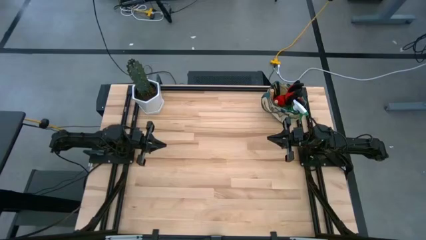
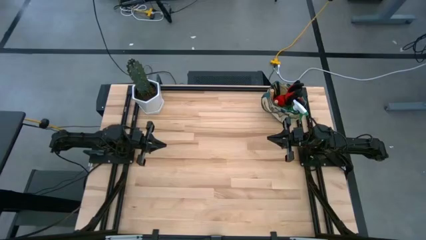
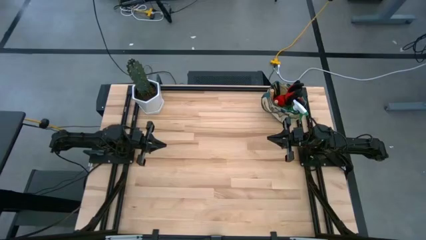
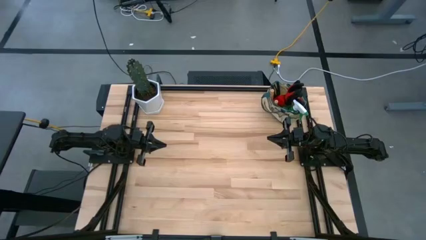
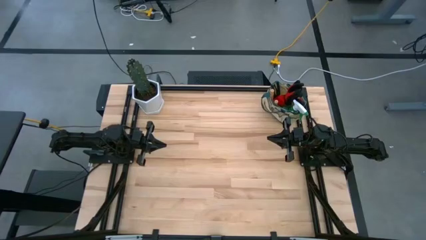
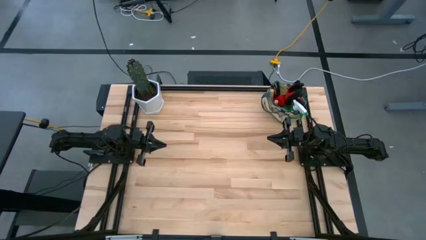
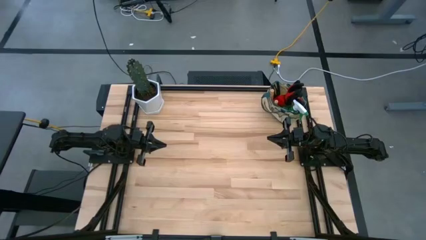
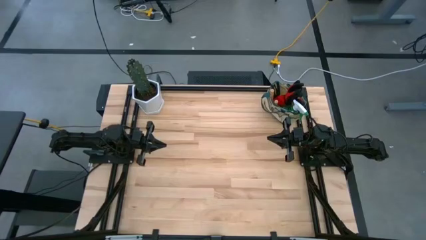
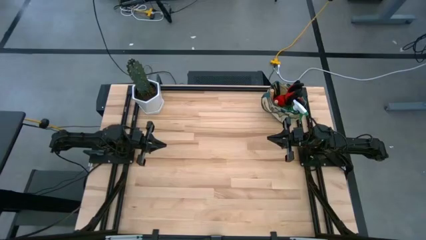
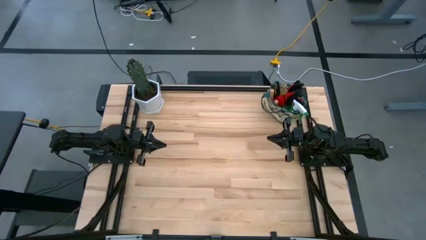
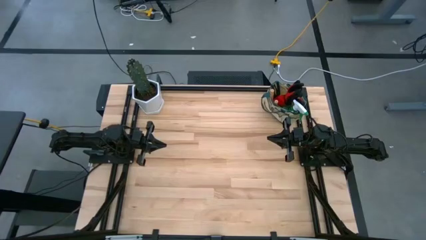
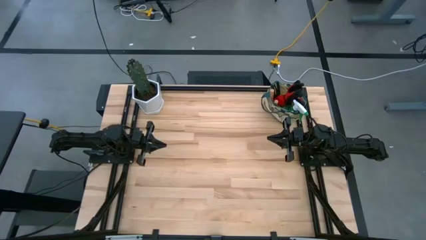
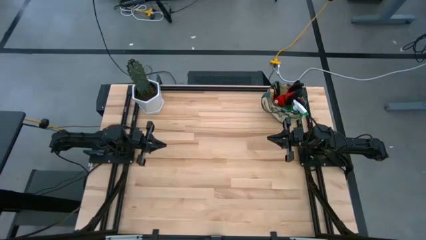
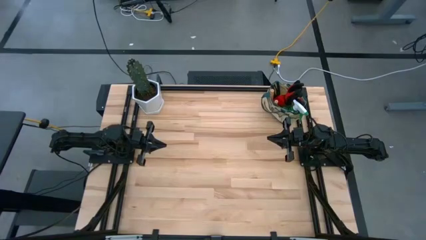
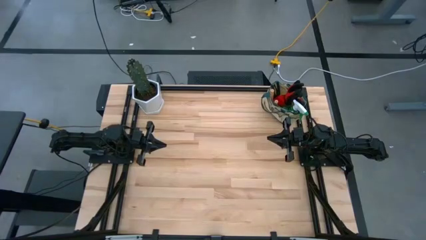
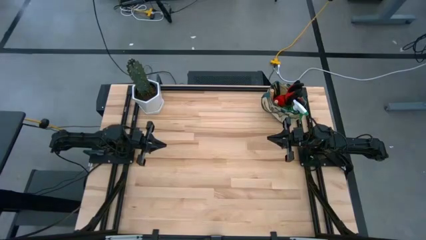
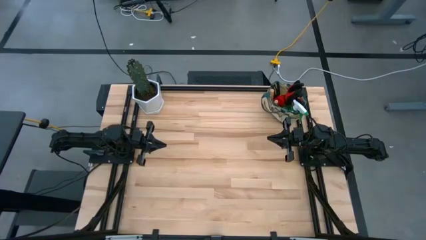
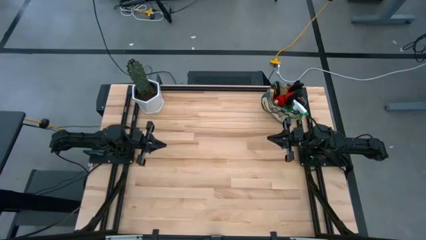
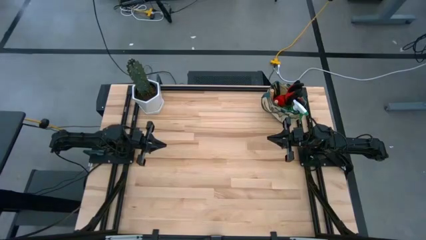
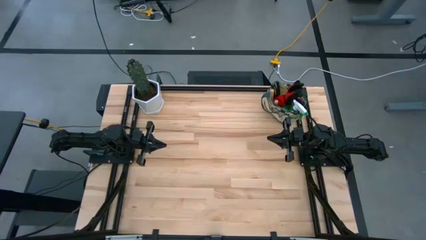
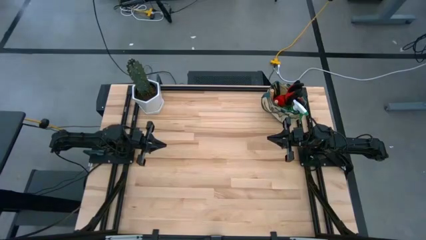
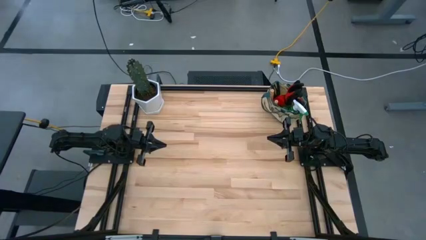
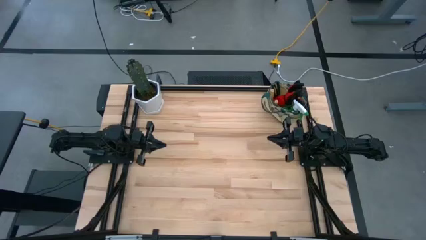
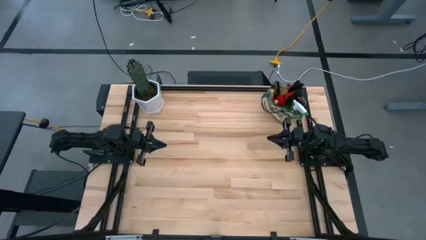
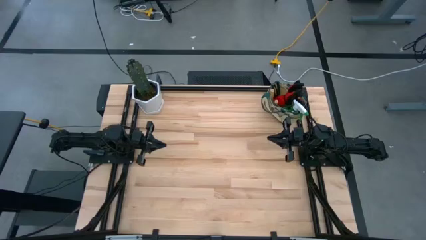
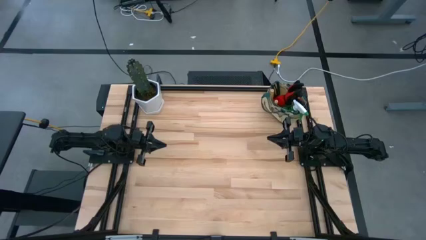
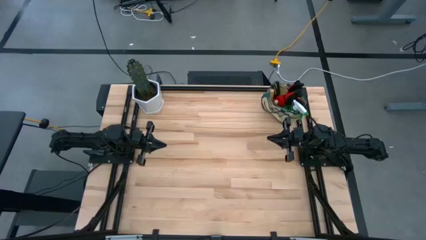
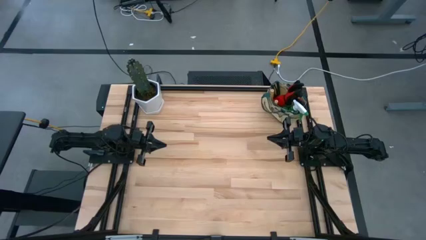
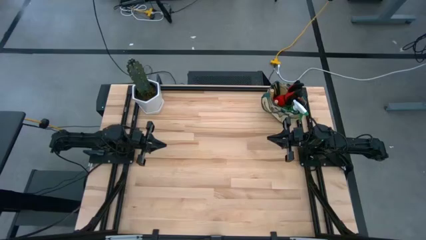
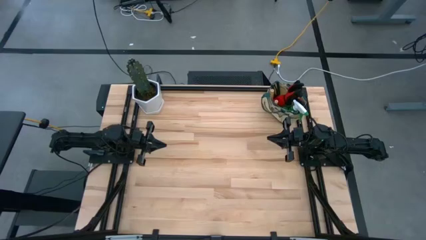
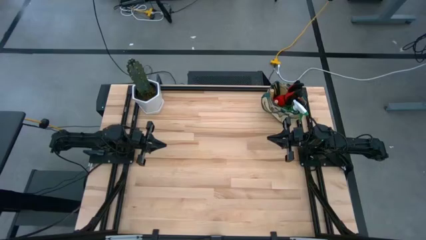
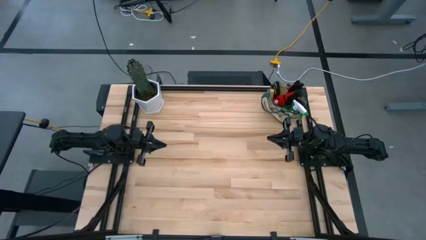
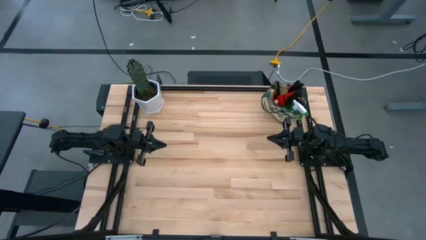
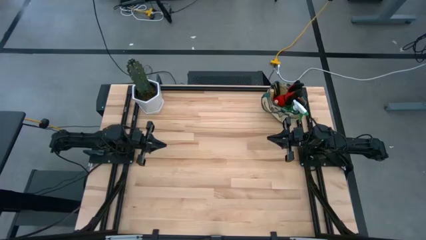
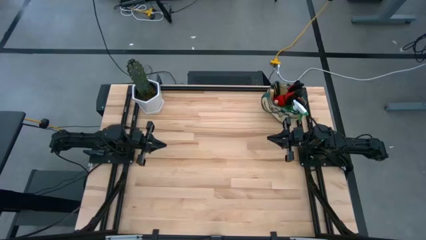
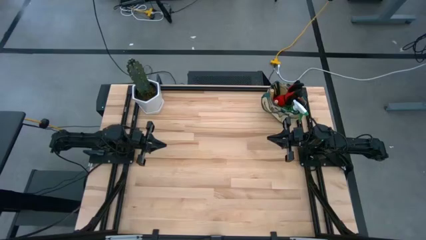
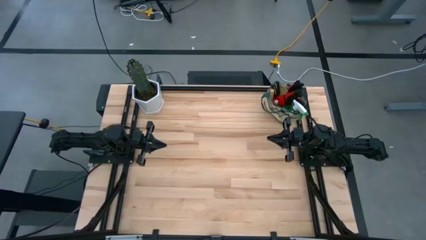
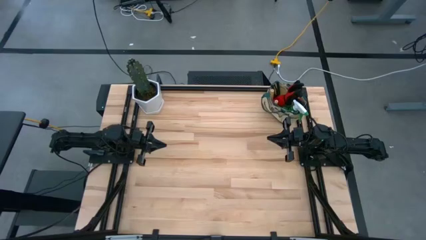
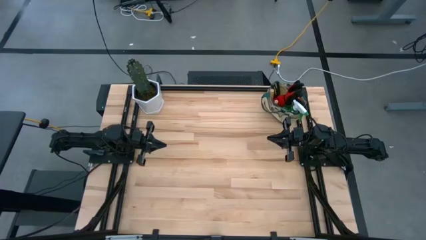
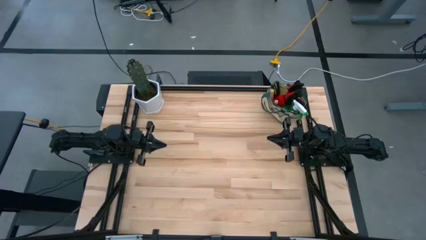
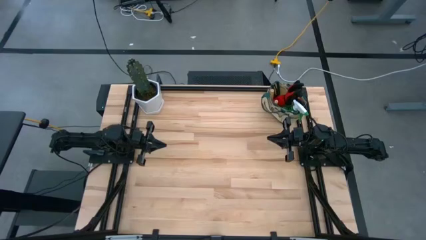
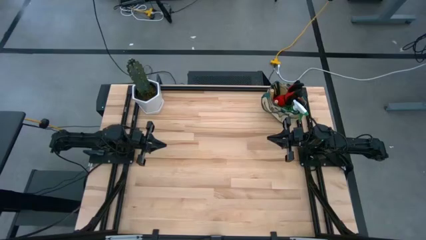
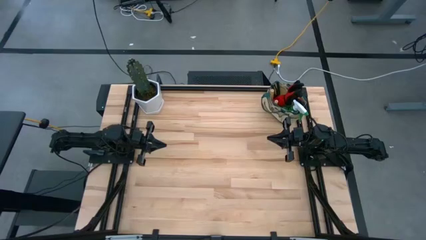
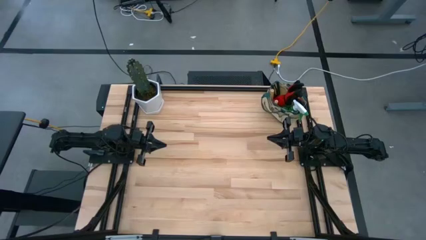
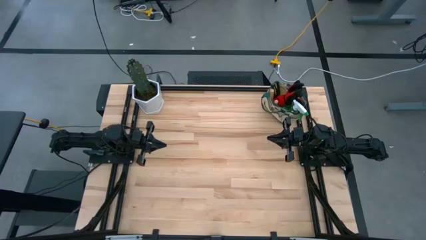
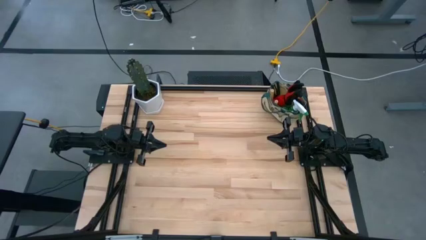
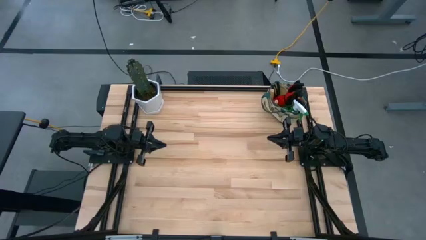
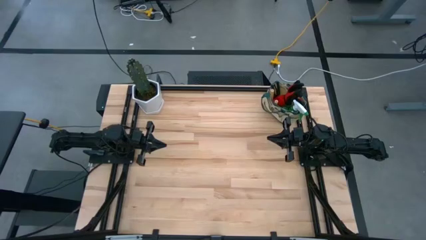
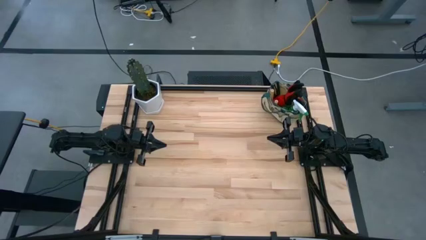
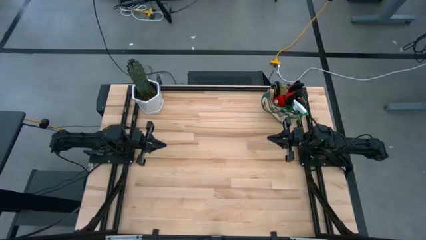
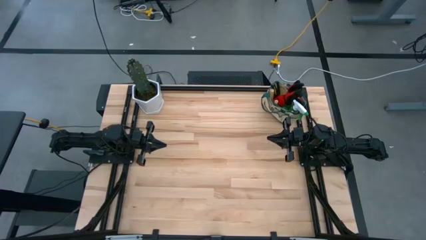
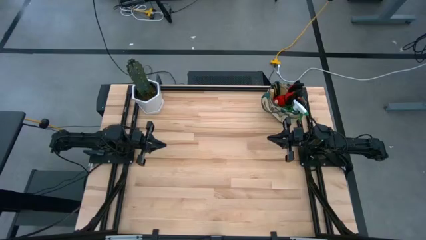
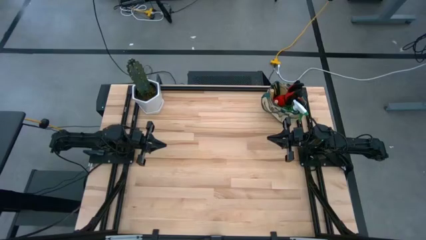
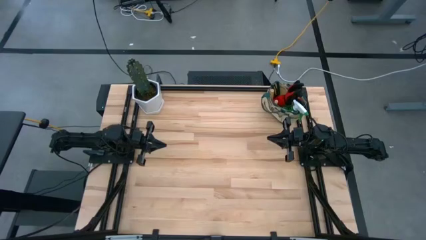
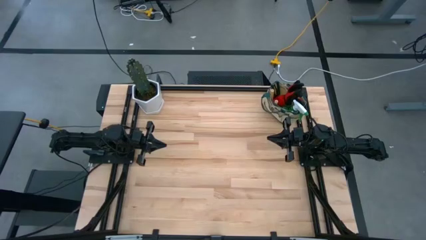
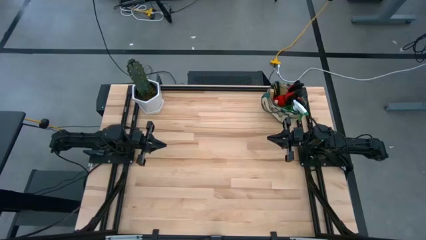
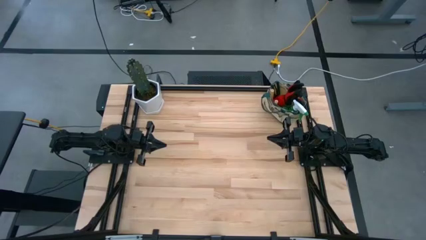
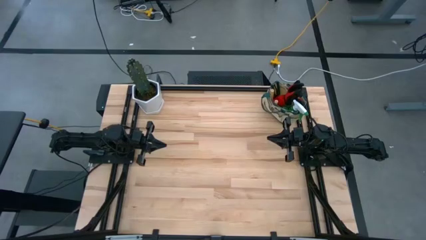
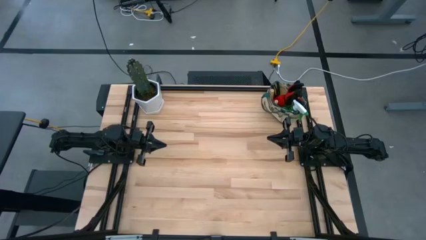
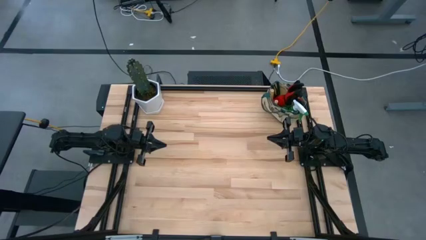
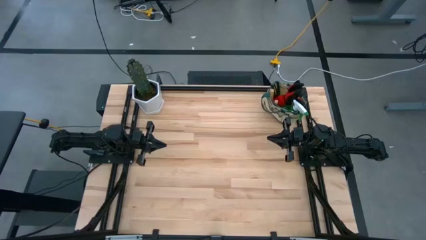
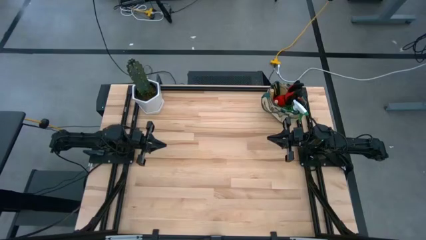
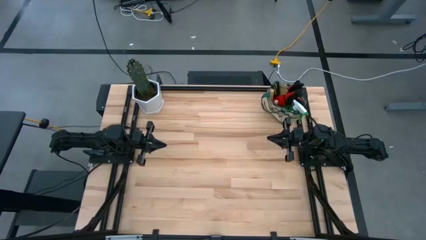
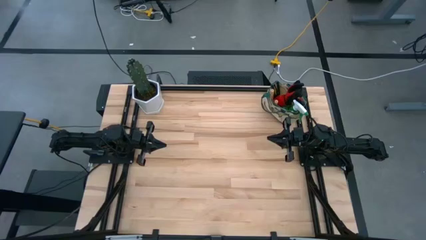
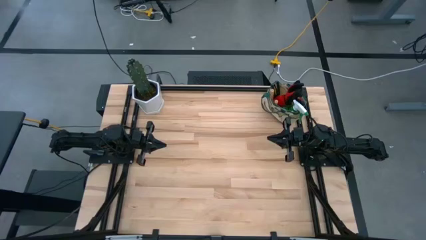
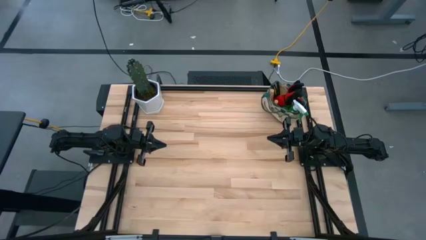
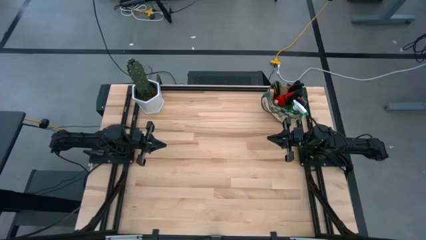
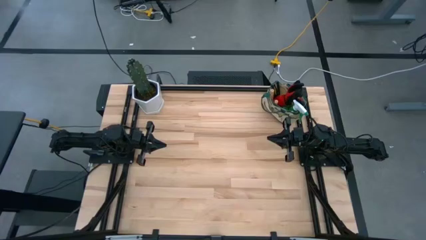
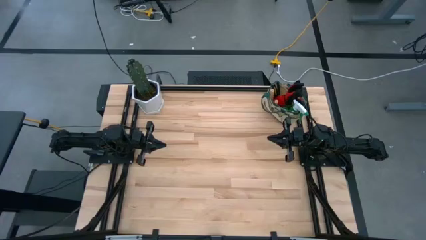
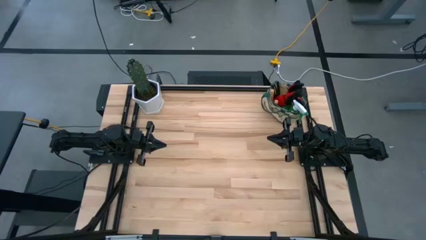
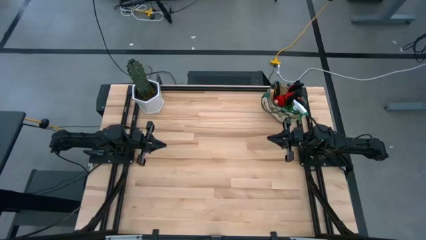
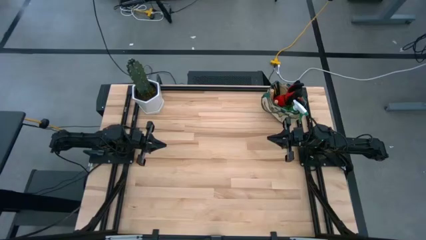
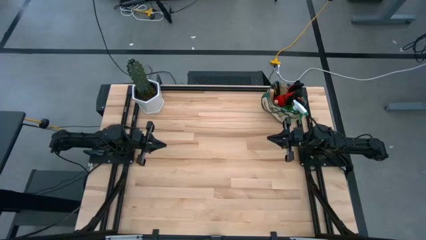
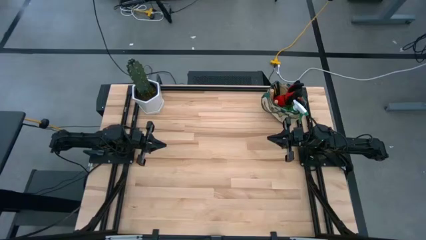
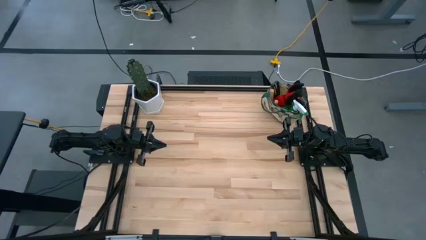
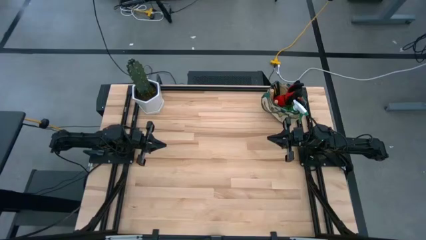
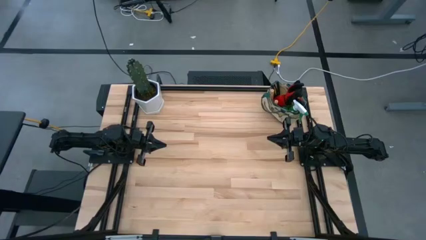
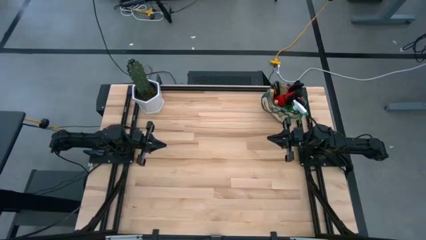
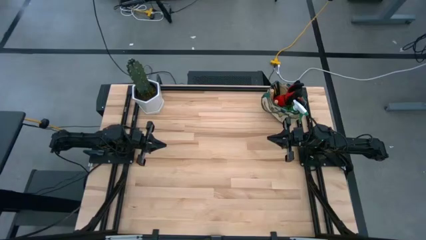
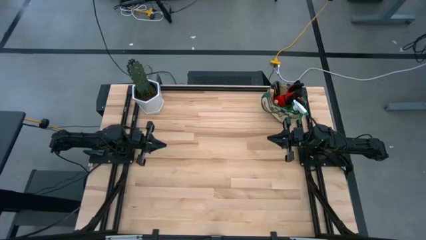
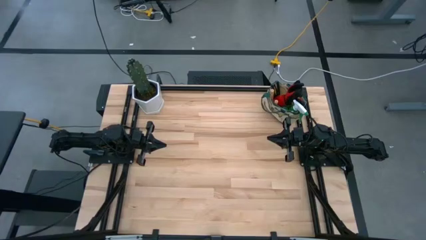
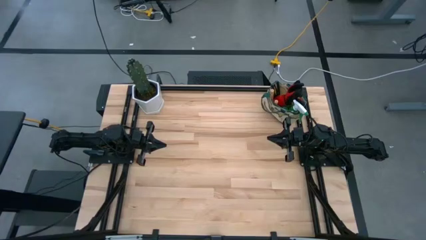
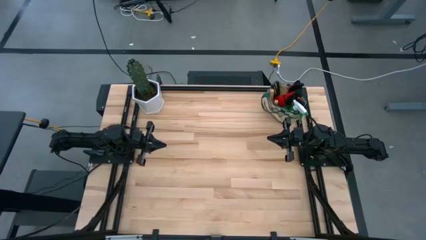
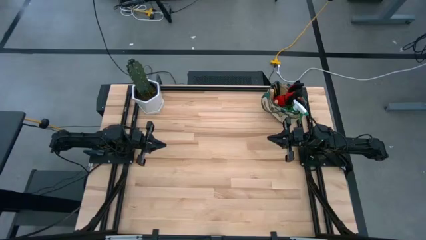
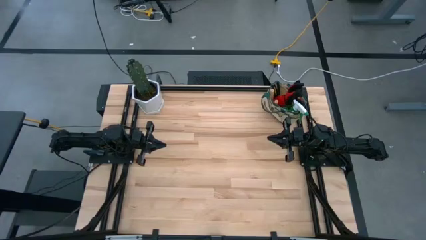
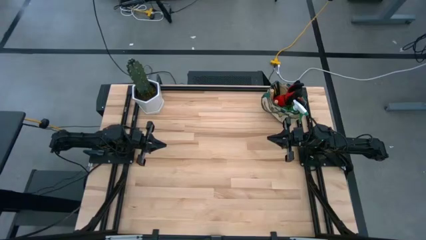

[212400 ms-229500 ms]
Task: Pick & Place Garden tools in Gardening bag
Return to Home Position

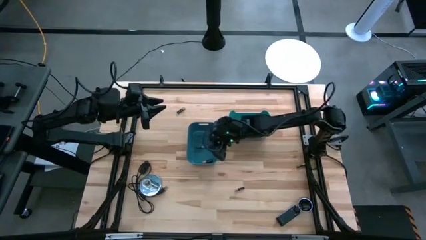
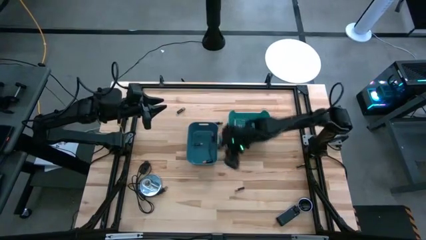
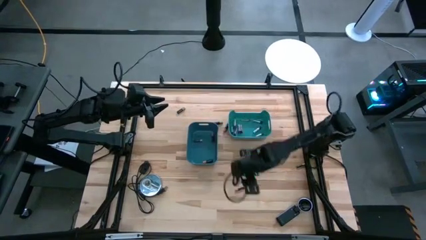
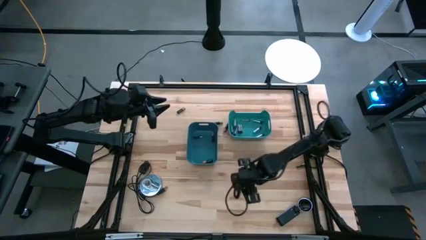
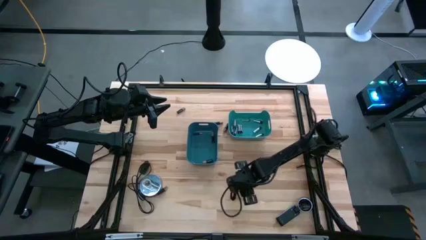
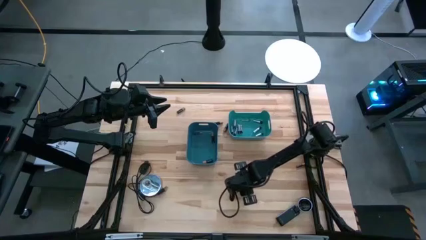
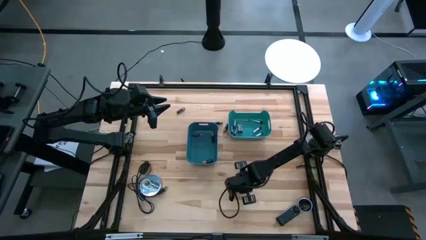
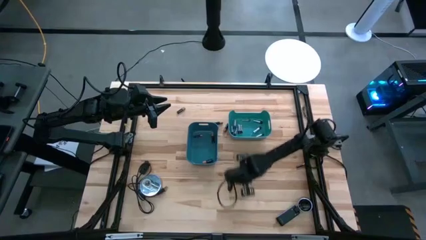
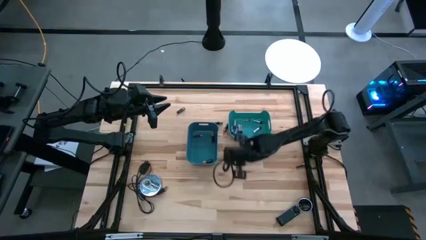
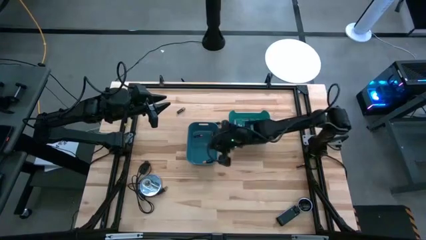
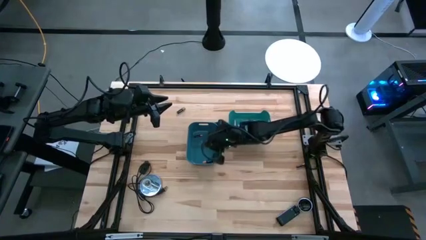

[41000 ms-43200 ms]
Task: Sort batteries
Put the black battery into the blue bin
